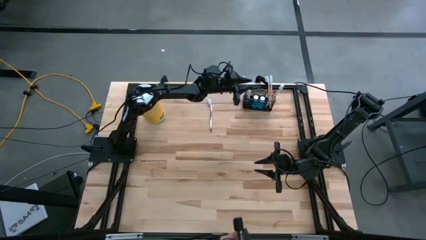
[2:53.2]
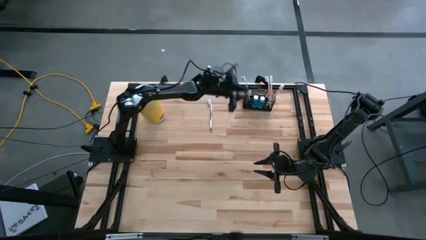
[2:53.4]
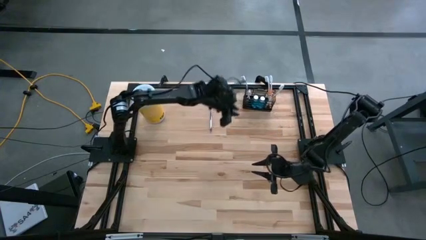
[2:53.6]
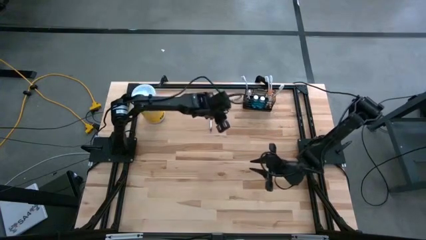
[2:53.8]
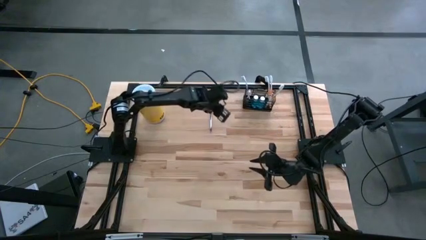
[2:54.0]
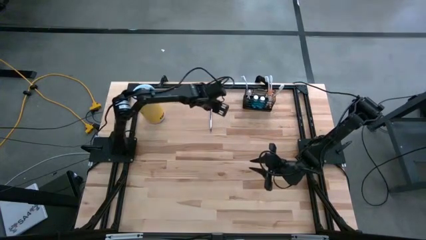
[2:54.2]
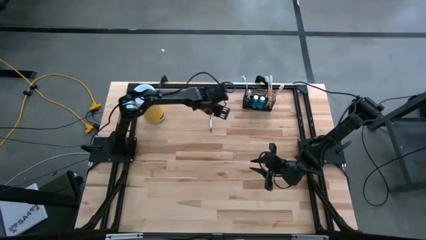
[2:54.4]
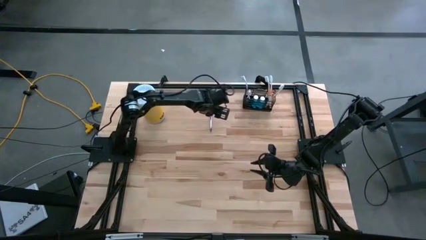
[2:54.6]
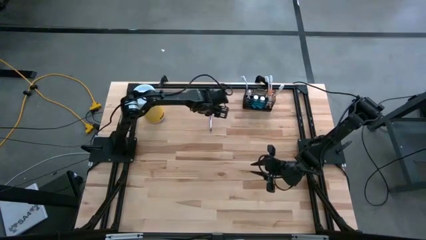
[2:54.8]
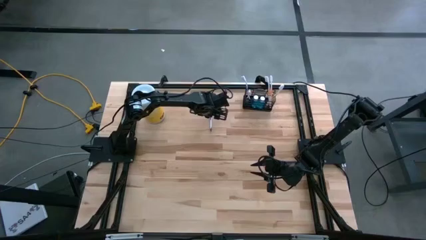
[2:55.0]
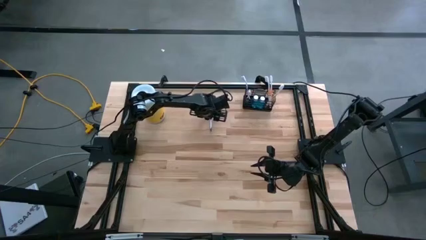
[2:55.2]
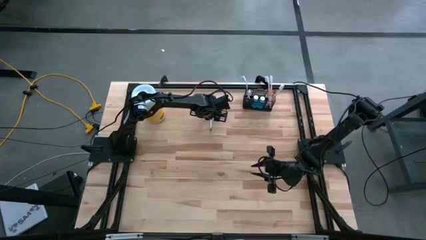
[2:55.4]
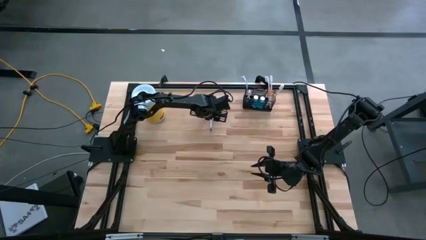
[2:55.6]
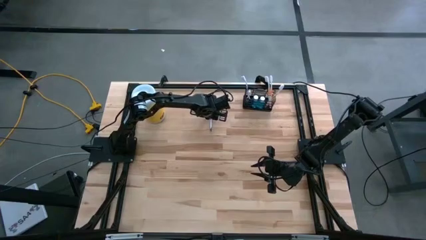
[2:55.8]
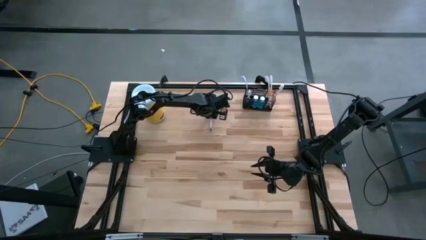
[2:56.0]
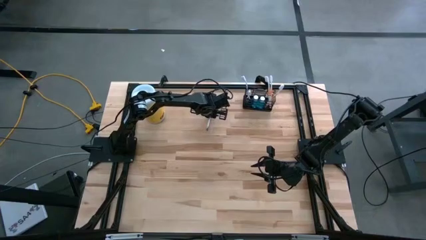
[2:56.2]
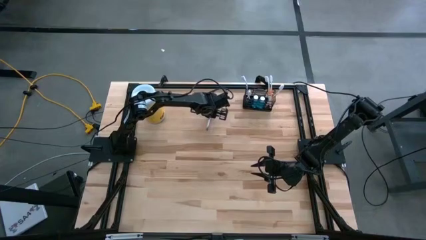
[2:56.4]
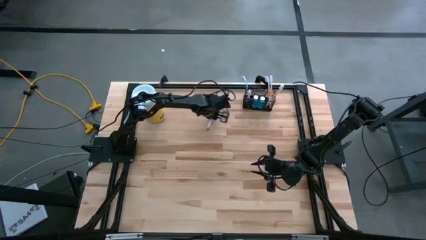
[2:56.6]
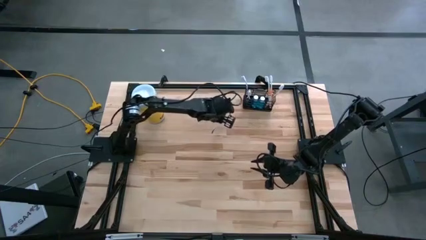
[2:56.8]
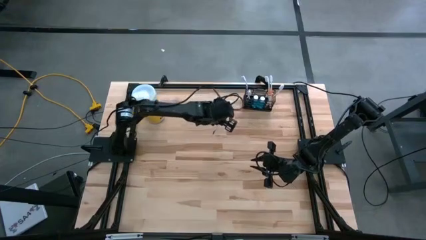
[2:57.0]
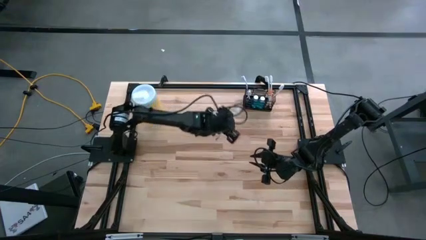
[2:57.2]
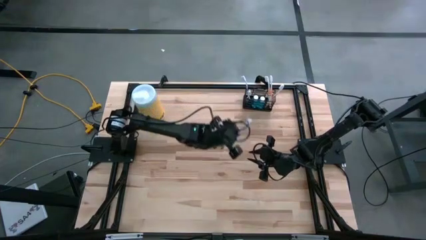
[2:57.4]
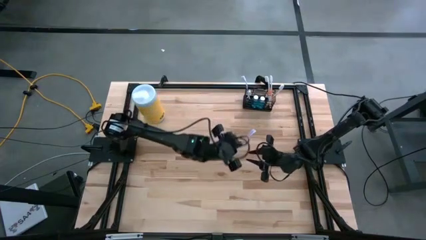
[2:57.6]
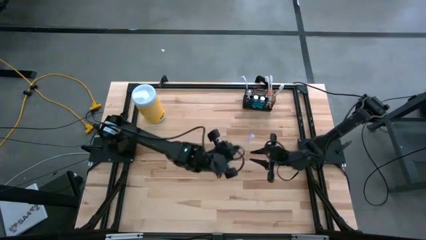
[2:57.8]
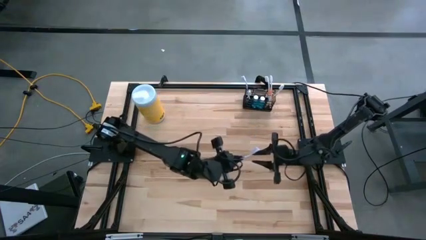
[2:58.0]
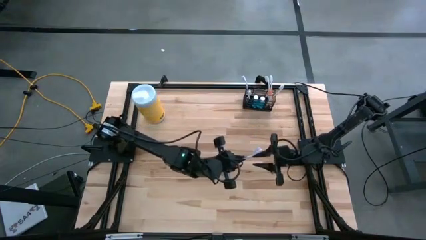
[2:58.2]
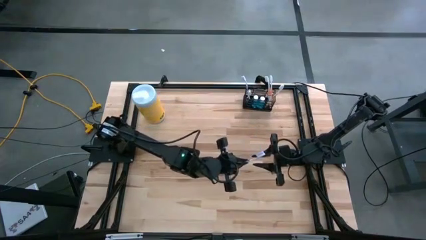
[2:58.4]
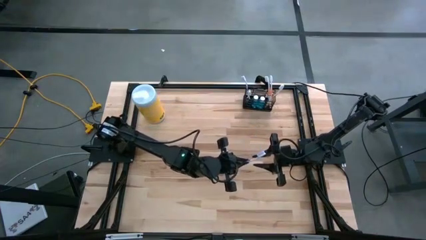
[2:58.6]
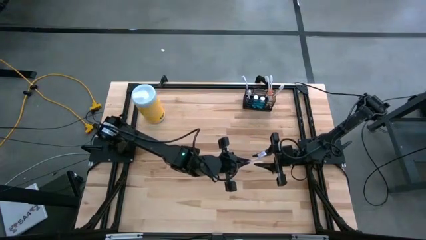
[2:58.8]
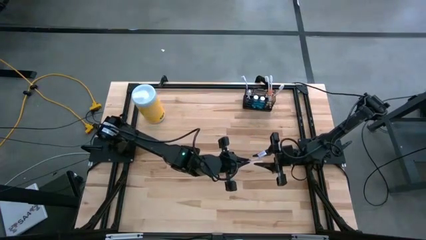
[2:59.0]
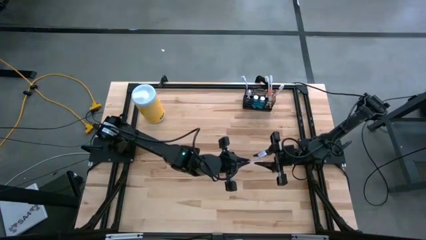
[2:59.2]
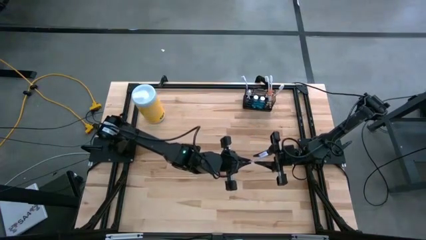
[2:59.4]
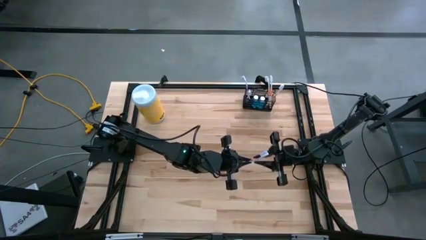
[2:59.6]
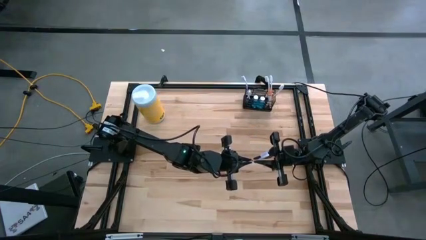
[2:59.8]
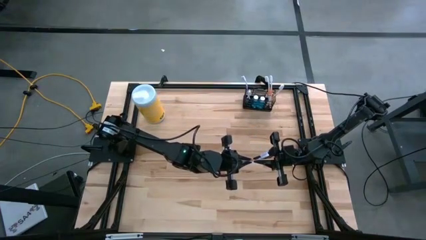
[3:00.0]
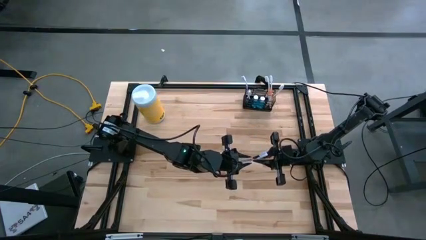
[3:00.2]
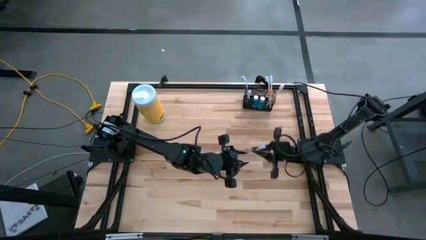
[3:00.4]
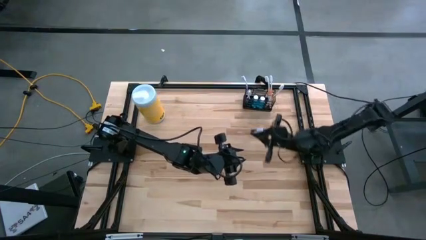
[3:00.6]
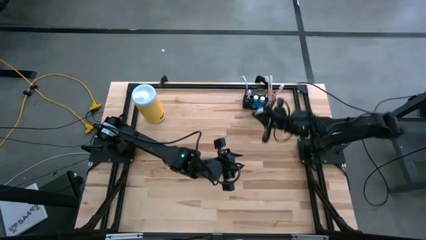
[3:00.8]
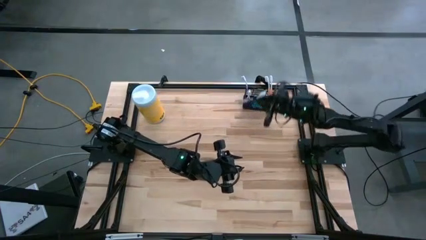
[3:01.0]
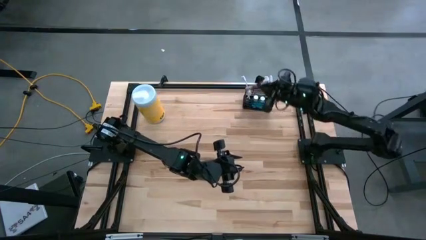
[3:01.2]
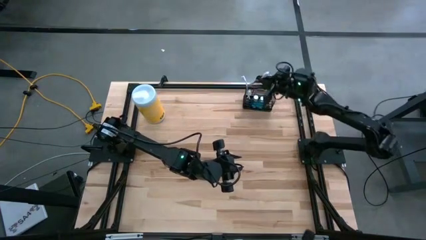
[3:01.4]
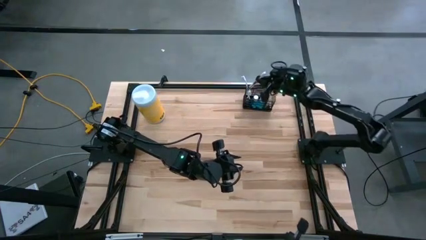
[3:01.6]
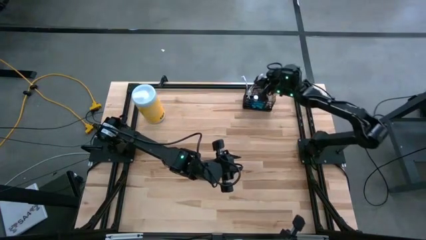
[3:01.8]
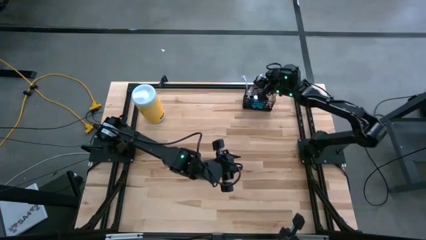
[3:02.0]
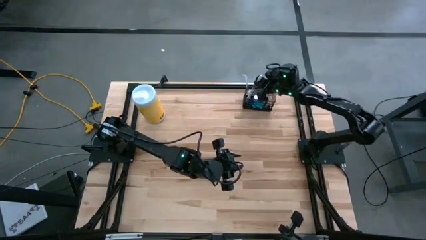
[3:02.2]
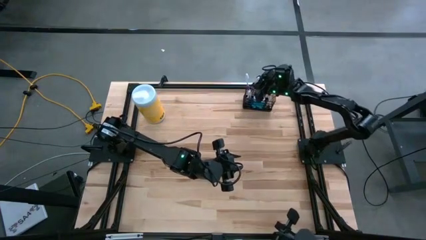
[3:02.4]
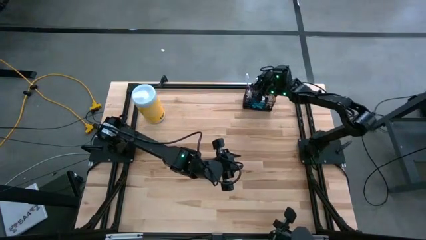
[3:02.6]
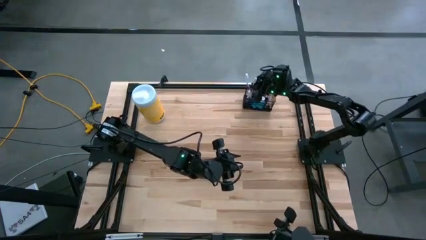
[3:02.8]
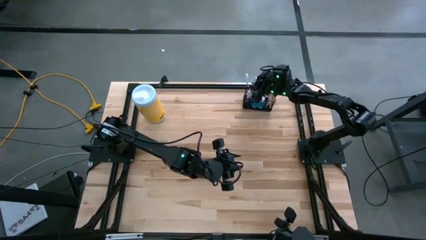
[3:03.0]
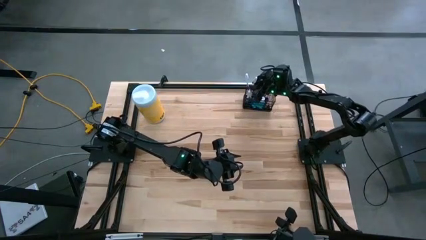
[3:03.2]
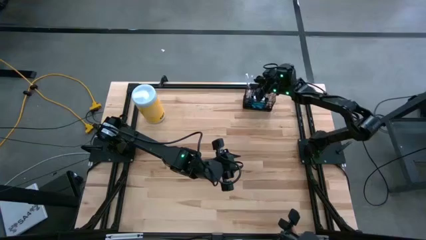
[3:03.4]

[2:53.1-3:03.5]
Task: Pick & Place toothbrushing station
Put the violet toothbrush into the black wire organizer

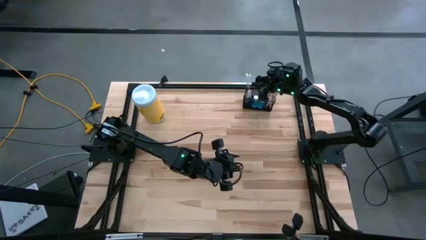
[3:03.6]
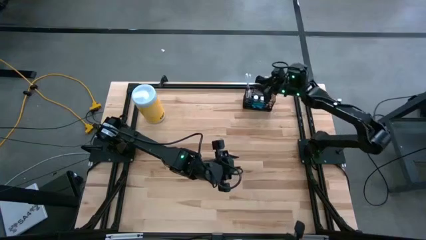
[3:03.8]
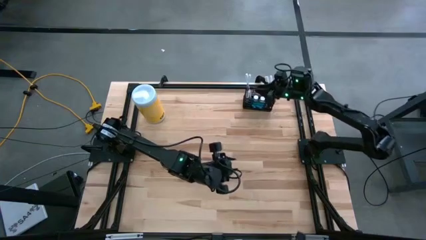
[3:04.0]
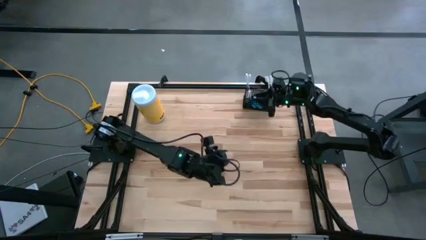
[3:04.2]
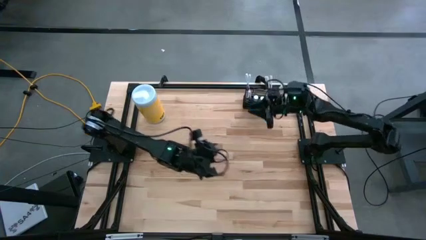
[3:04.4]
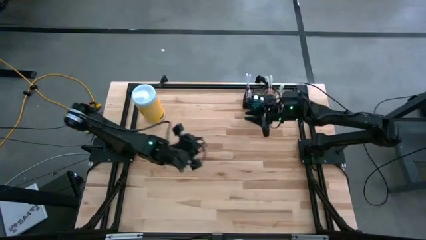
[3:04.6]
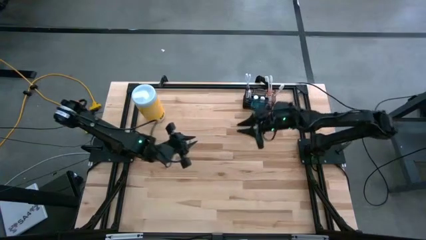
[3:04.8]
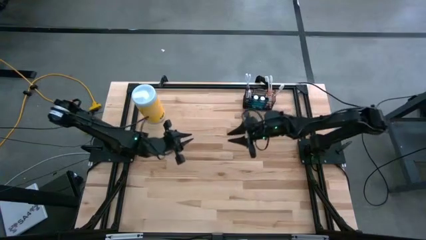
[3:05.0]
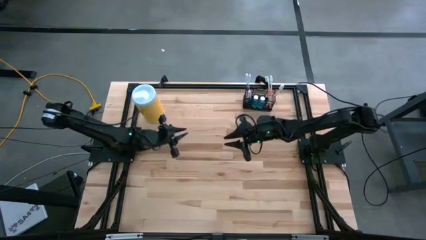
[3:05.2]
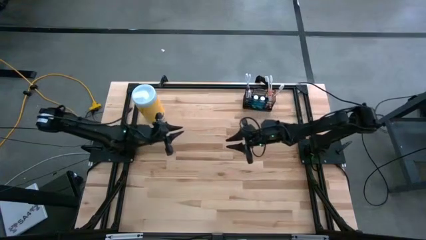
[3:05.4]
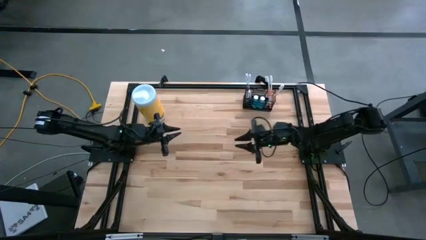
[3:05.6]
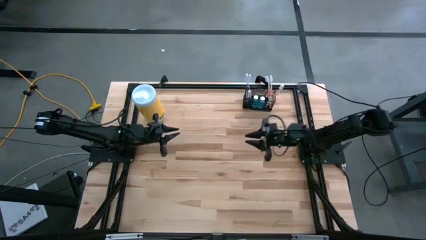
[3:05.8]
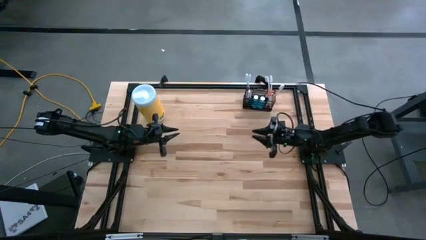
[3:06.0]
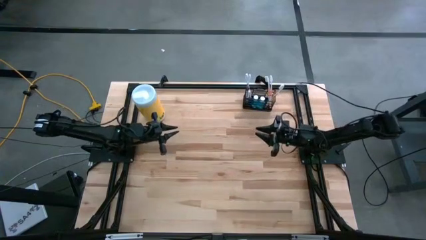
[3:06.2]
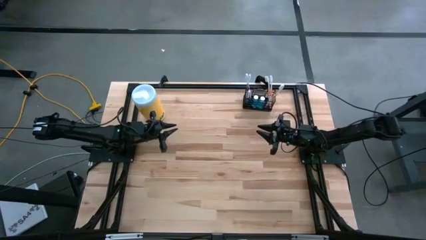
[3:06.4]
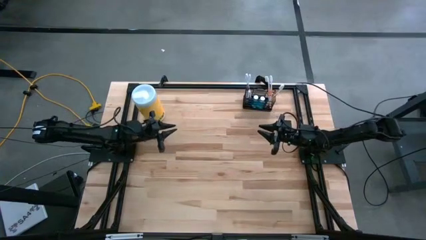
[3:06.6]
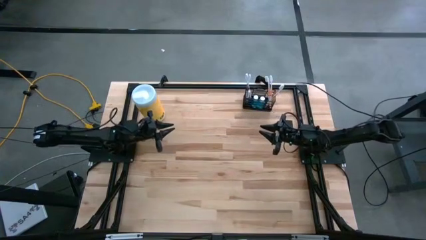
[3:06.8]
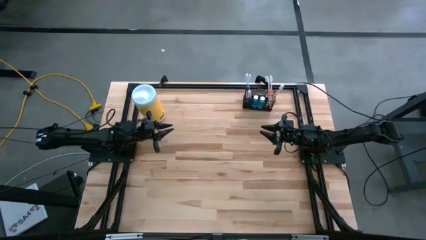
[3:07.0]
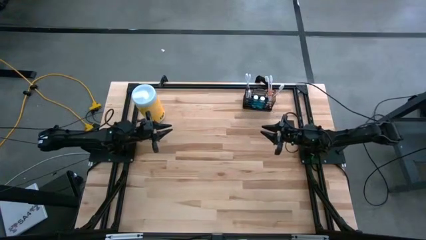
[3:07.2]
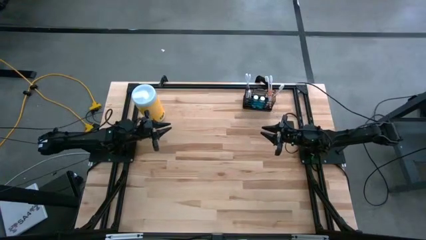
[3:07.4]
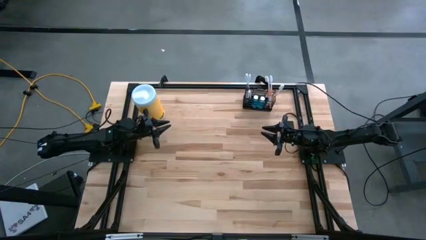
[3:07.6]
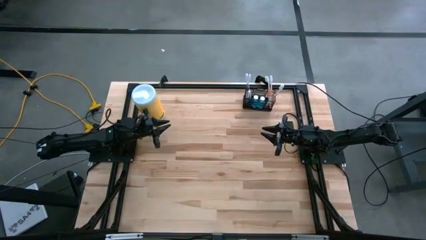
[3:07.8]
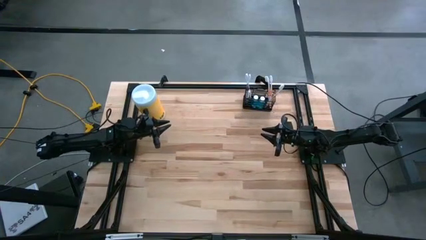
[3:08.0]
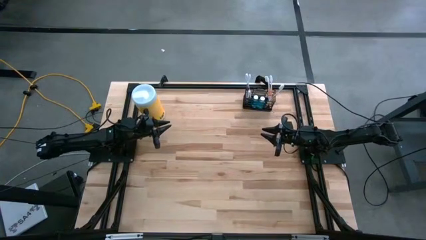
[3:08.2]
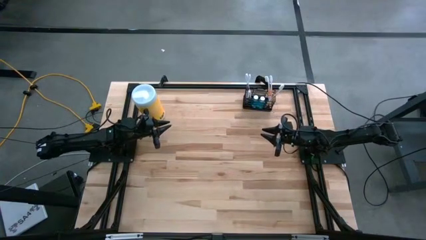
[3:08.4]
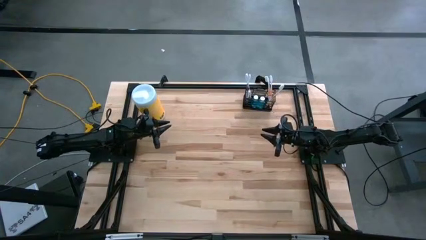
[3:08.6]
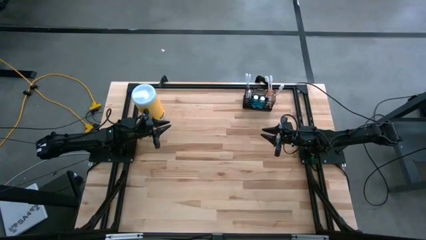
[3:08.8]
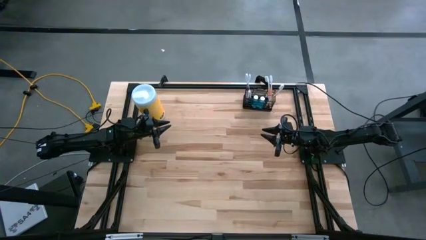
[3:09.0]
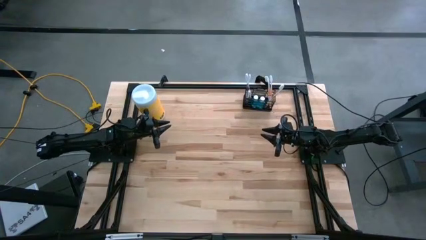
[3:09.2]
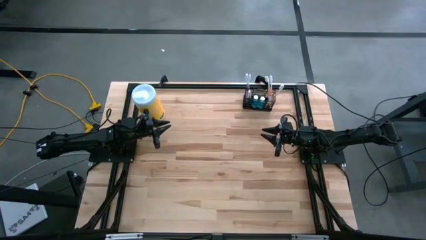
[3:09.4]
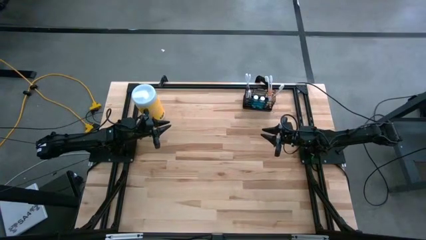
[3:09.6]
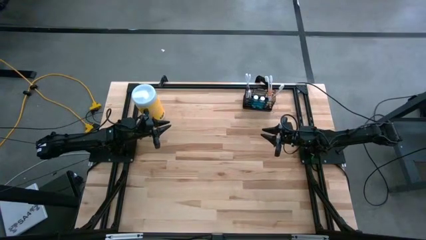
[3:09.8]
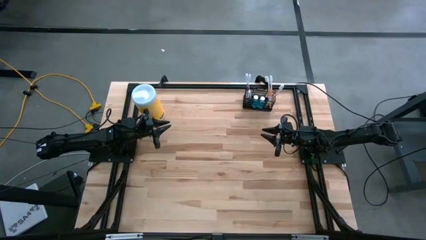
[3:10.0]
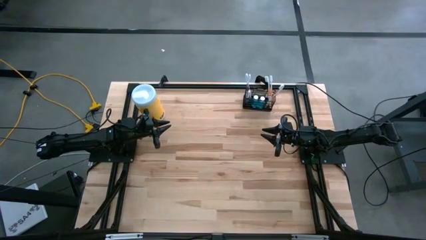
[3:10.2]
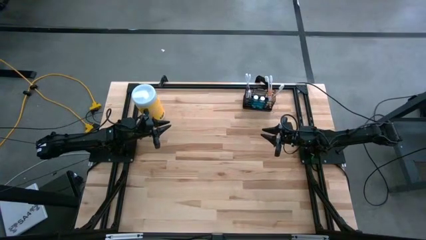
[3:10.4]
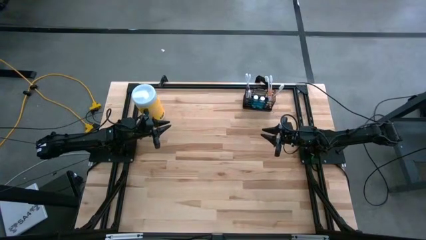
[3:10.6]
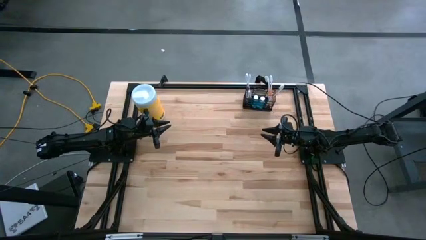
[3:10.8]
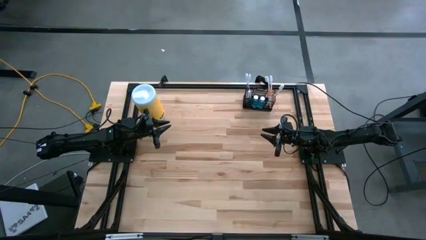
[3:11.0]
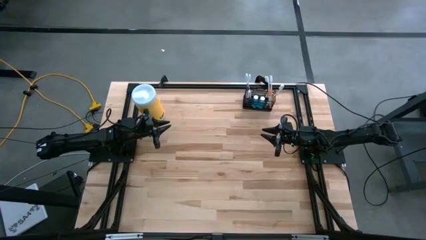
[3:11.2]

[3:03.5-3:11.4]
Return to Home Position
